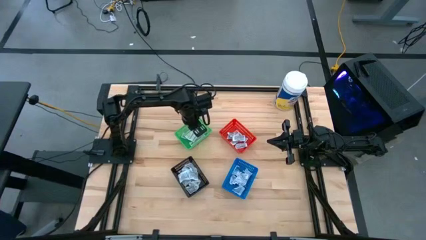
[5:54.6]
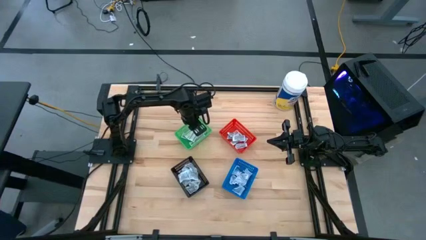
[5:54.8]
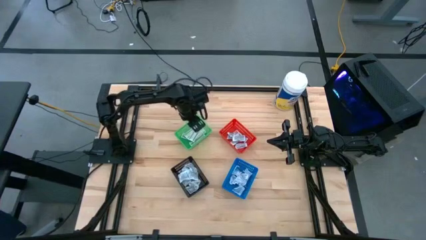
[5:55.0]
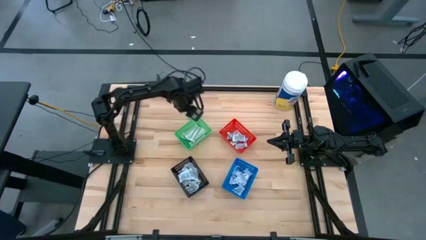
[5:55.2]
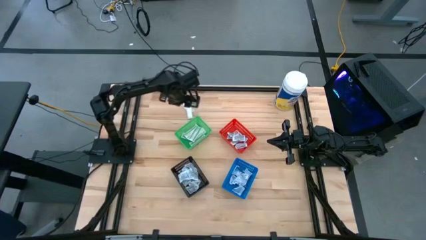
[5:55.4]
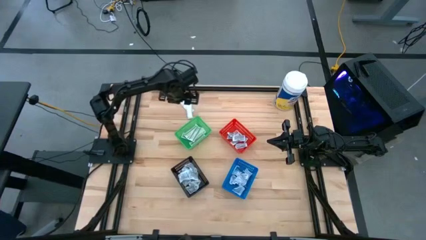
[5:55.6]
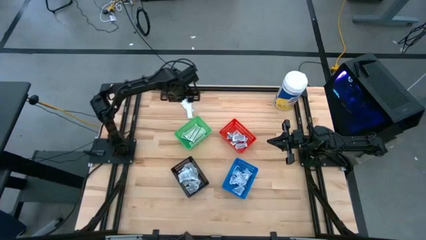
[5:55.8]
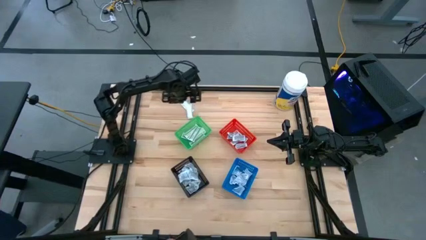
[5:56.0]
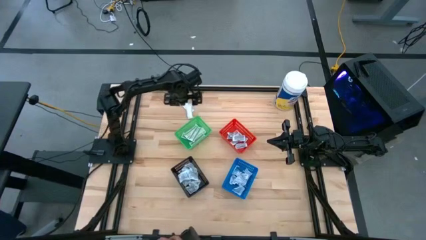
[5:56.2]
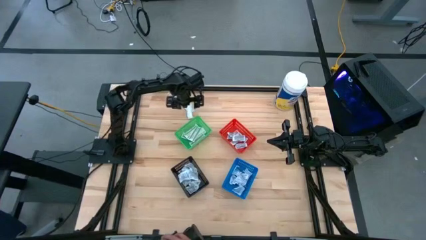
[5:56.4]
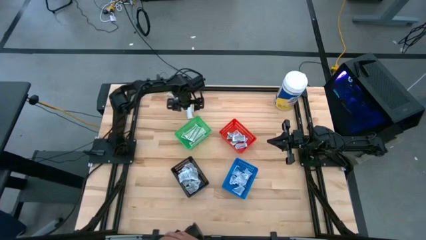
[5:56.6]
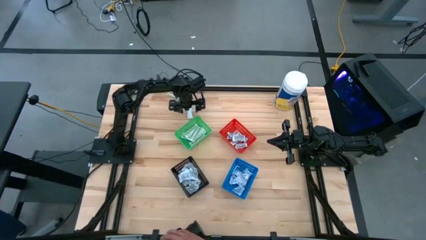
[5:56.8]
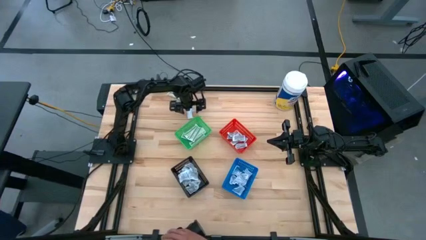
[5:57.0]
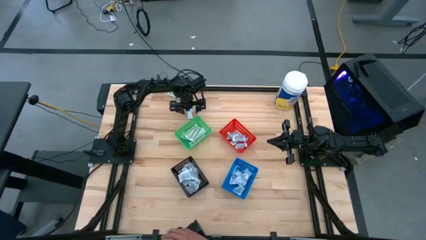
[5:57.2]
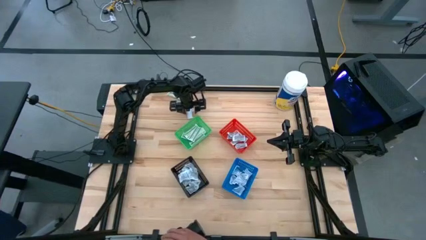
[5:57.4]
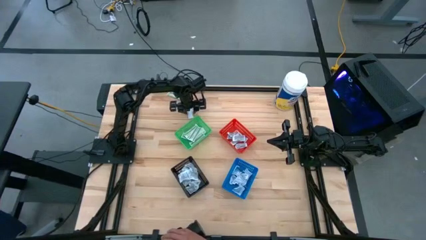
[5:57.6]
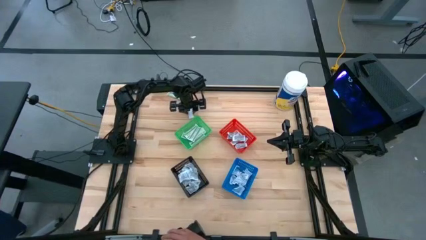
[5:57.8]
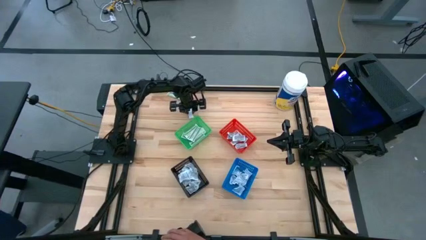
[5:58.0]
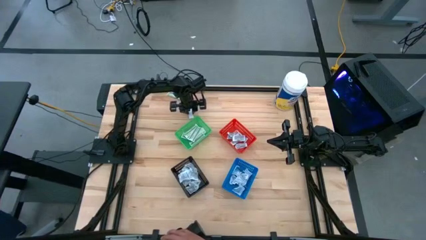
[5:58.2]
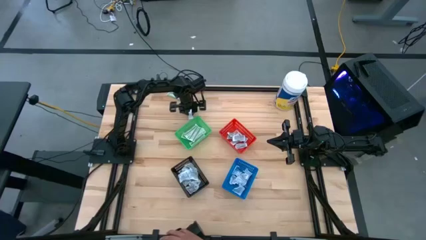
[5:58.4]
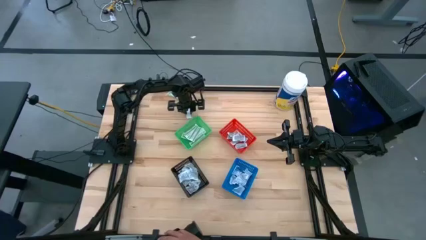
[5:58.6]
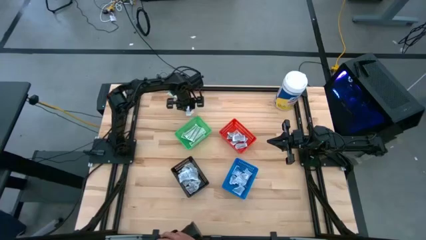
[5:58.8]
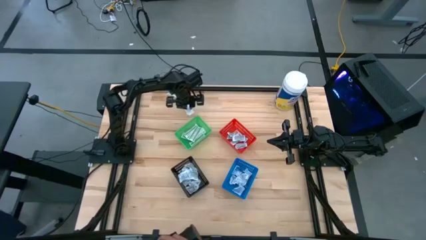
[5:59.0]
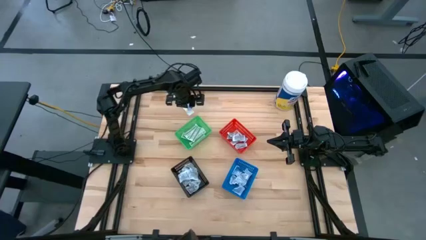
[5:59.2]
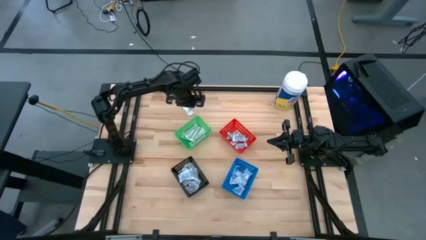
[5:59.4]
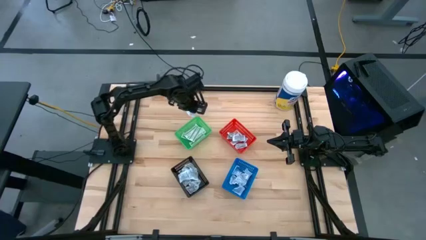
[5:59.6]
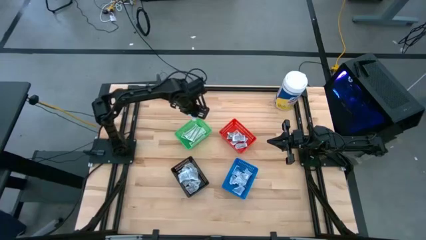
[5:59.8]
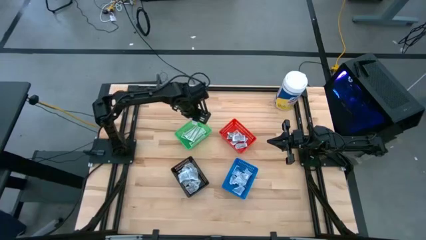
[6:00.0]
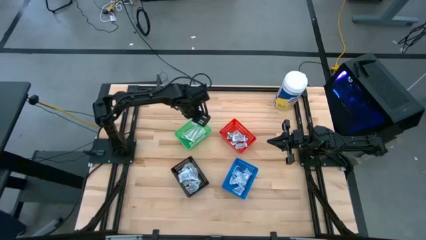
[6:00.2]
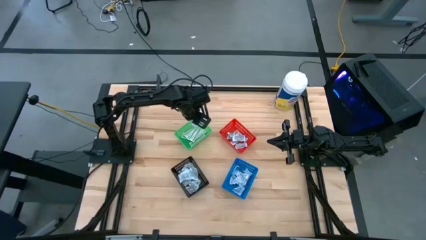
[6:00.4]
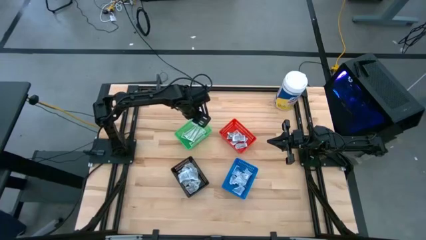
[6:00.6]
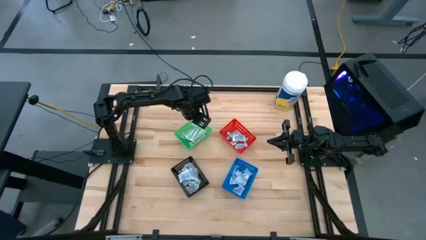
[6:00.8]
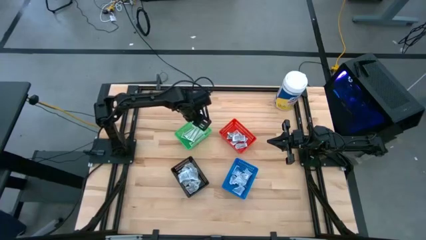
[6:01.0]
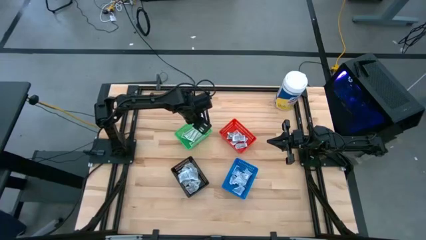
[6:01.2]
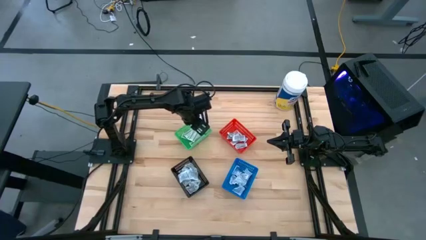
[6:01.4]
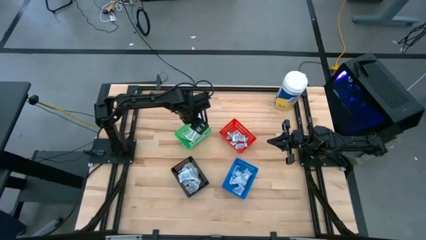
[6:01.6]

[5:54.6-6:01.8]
Task: Pick & Place First Aid Supplies
Put the green bandage pack into the green bin

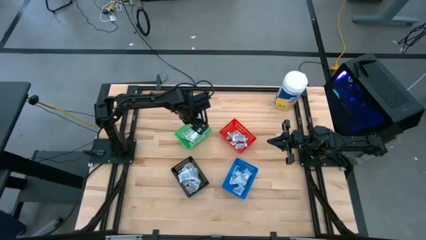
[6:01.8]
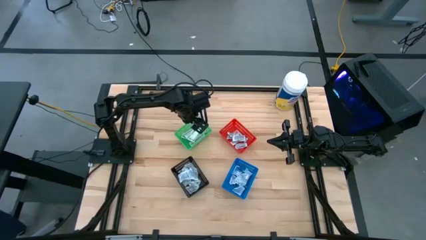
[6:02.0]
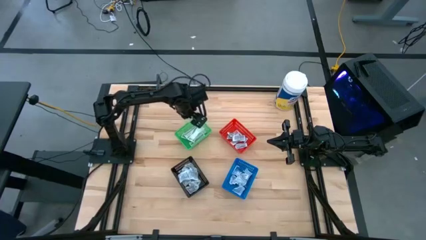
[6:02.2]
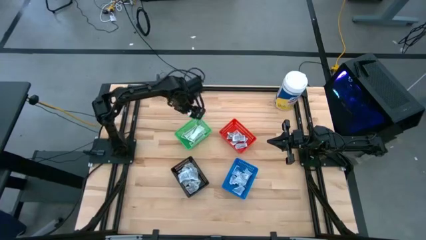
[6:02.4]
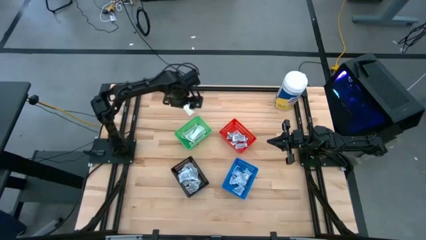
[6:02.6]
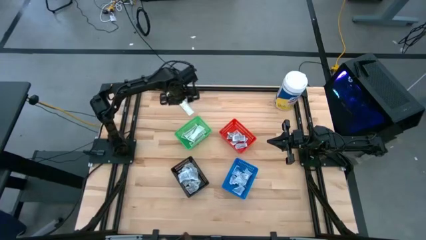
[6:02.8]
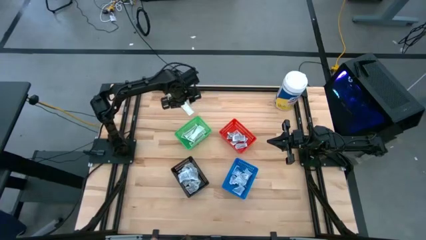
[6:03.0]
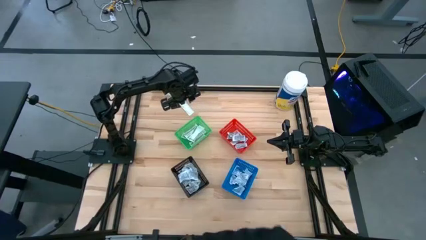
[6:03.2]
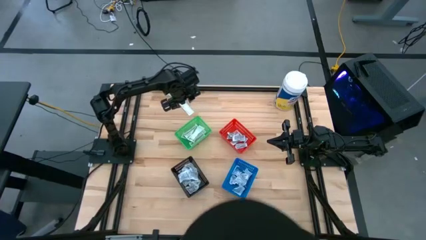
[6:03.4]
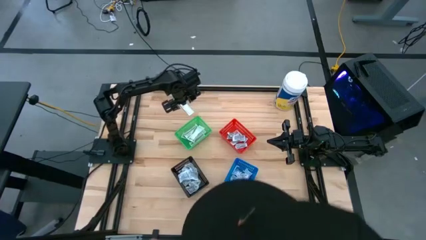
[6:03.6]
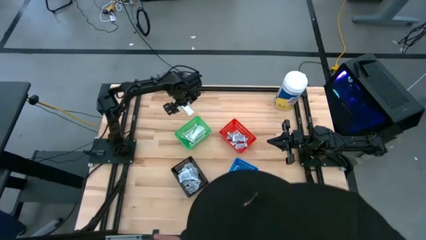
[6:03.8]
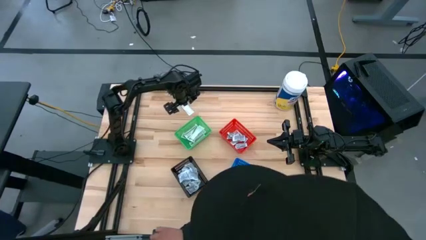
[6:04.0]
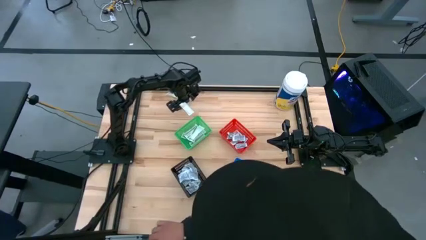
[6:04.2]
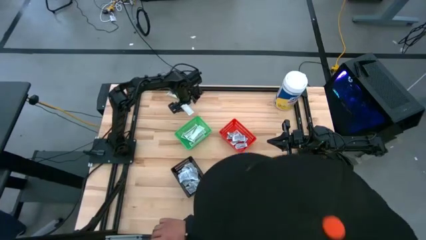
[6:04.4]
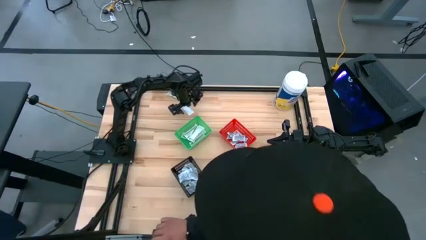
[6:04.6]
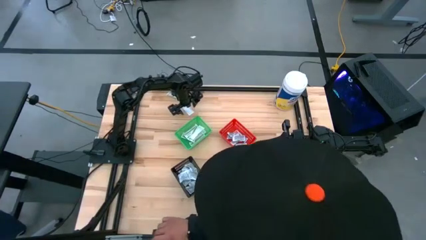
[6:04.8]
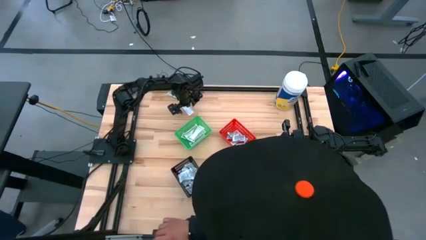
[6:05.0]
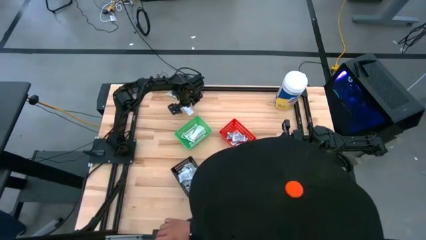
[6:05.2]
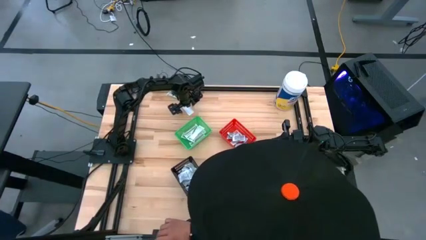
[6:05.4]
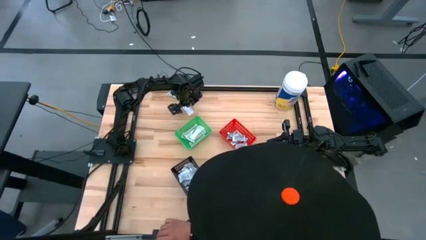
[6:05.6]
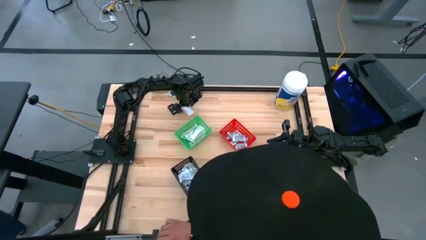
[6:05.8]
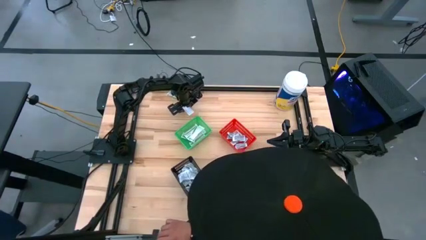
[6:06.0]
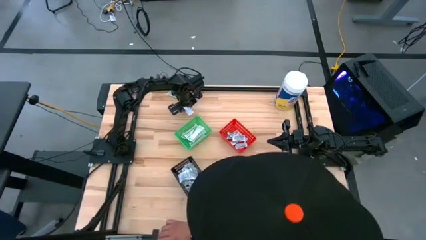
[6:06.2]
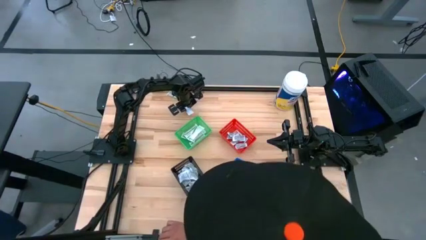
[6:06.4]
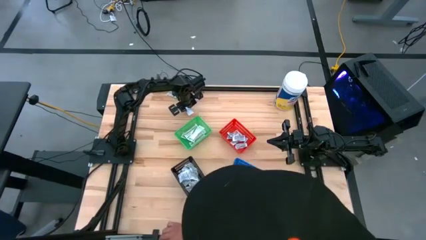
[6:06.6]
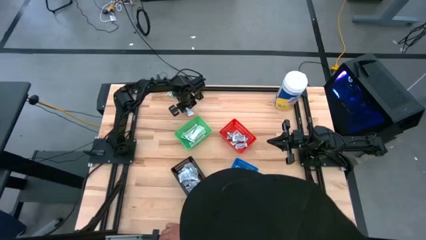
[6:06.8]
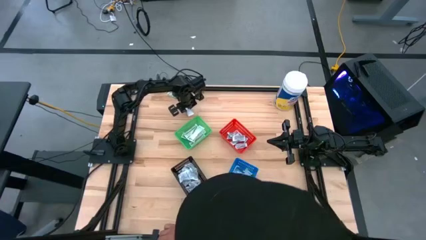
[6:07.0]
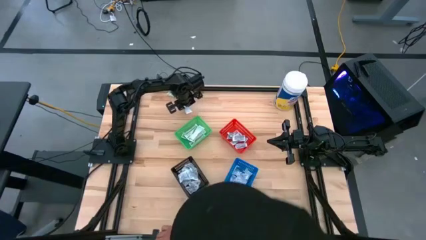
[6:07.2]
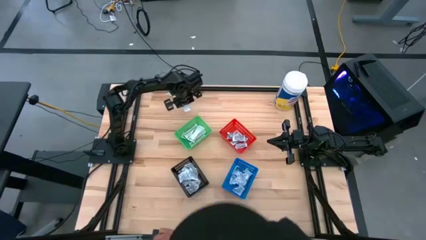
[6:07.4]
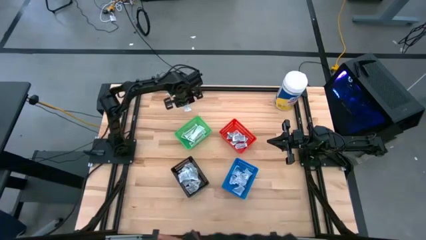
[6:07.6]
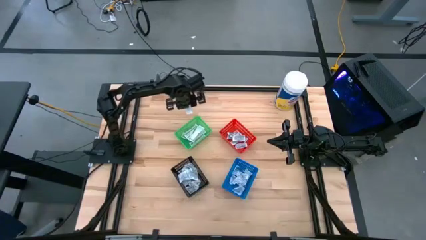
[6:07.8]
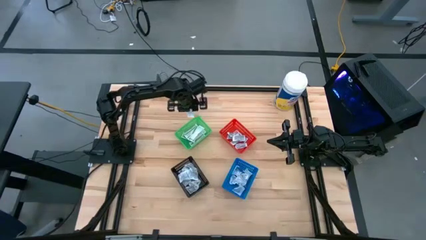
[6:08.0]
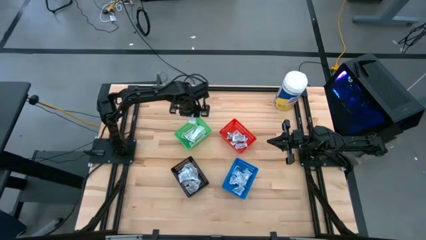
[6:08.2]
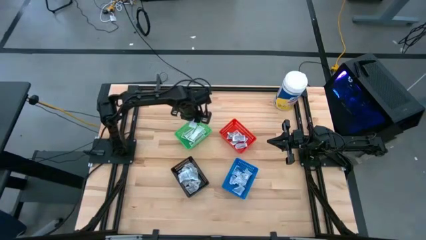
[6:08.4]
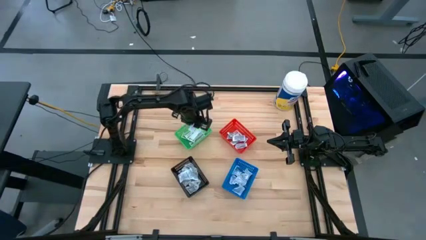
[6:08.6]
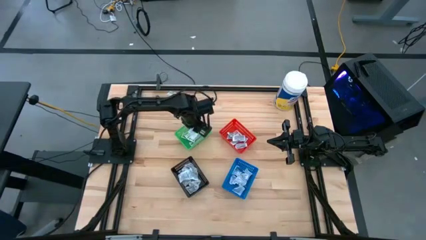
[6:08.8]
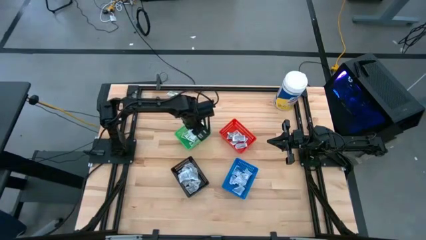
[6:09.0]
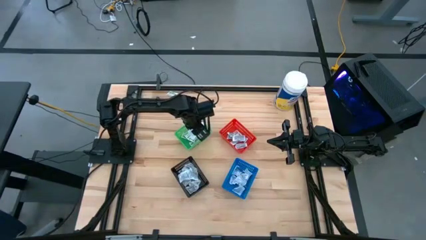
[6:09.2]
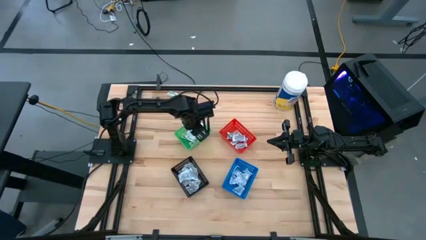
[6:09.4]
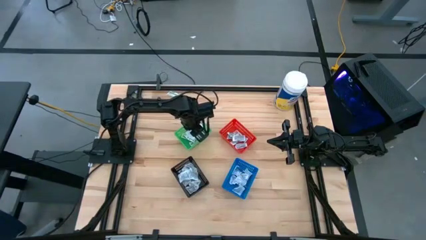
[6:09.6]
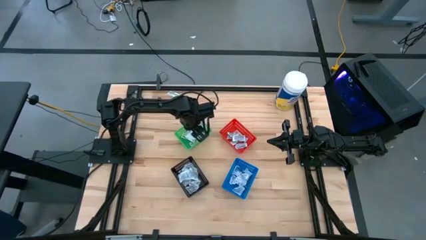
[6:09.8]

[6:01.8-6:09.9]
Put the green bandage pack into the green bin
